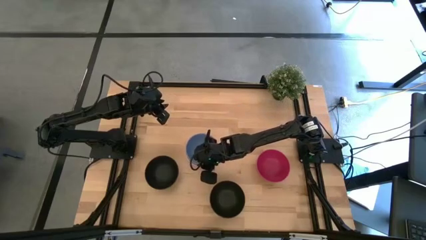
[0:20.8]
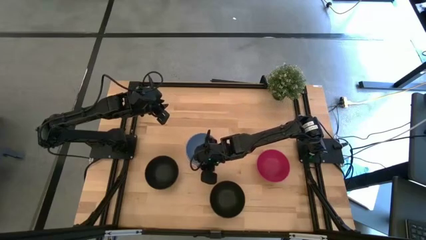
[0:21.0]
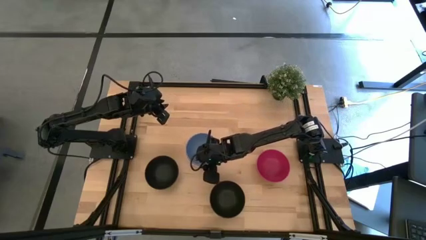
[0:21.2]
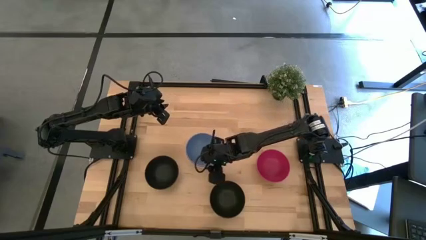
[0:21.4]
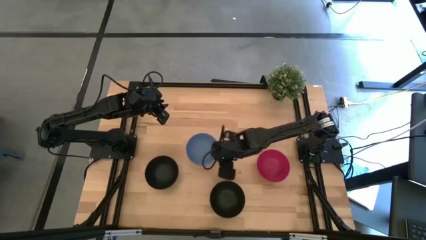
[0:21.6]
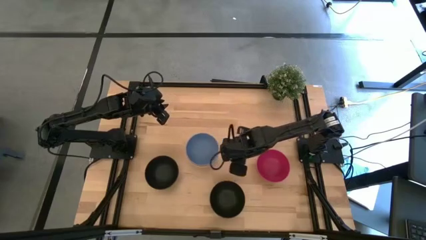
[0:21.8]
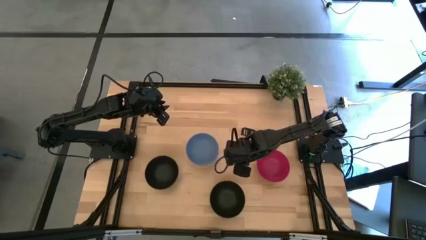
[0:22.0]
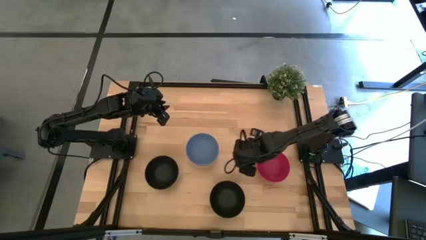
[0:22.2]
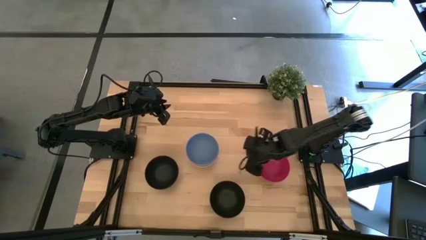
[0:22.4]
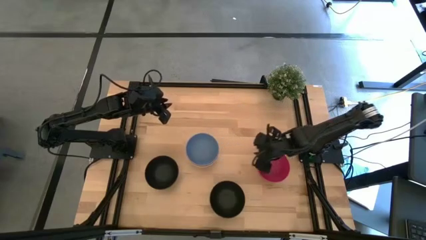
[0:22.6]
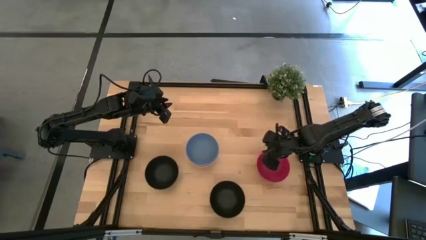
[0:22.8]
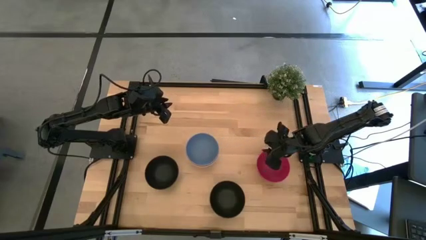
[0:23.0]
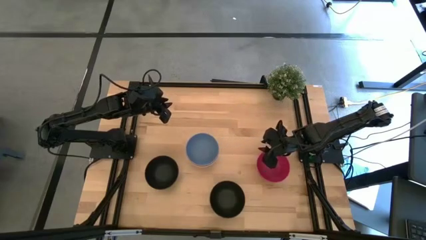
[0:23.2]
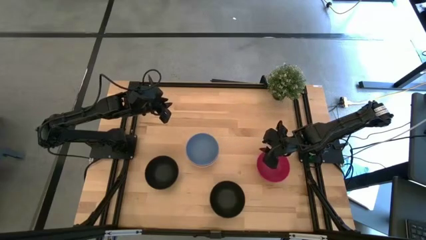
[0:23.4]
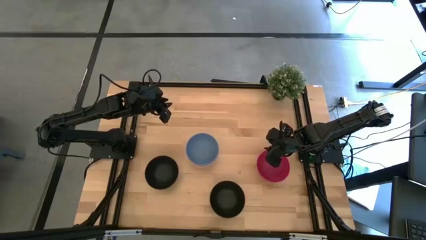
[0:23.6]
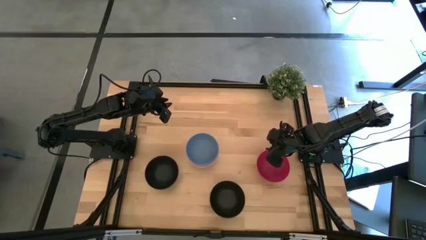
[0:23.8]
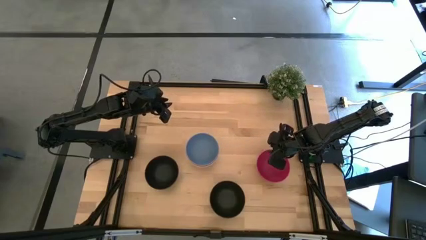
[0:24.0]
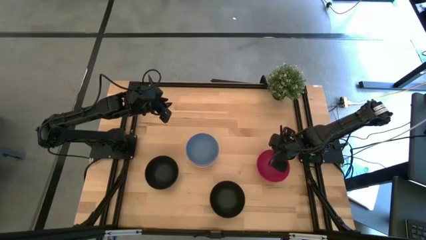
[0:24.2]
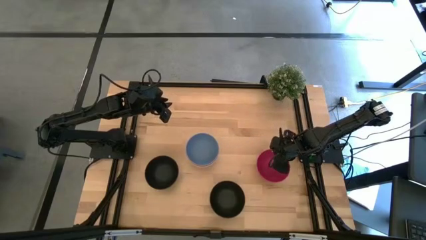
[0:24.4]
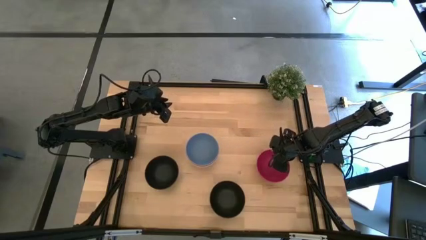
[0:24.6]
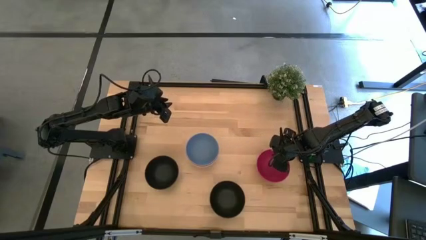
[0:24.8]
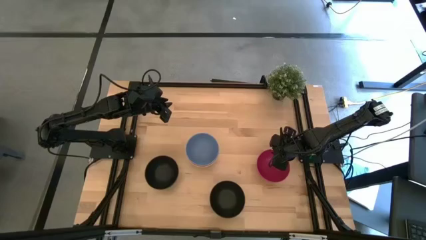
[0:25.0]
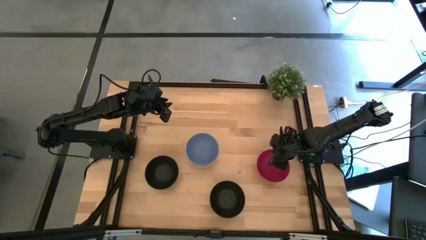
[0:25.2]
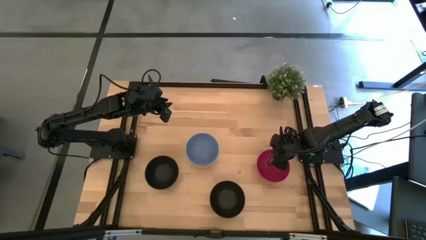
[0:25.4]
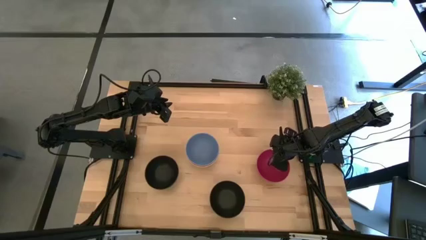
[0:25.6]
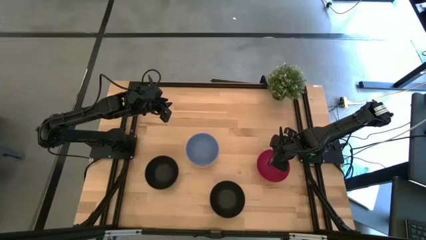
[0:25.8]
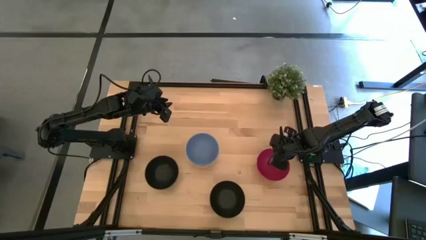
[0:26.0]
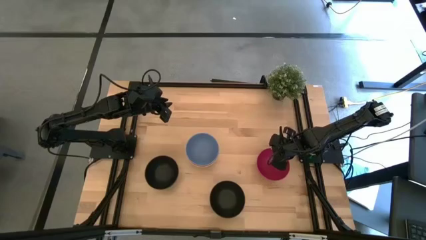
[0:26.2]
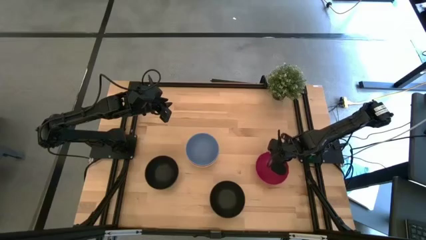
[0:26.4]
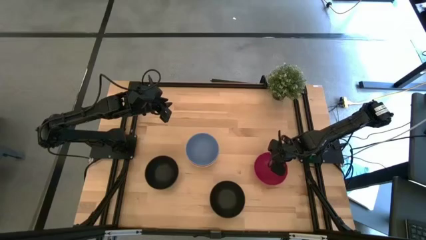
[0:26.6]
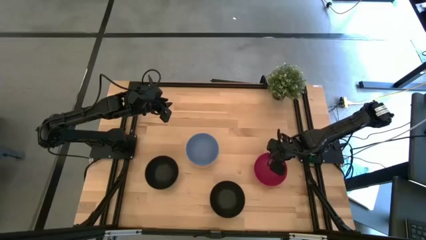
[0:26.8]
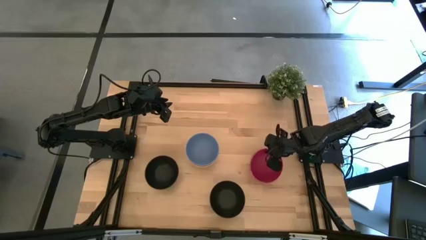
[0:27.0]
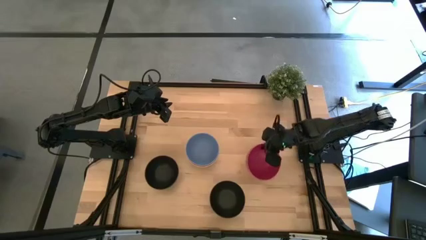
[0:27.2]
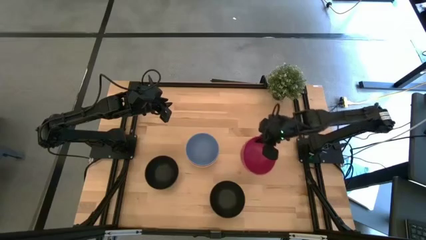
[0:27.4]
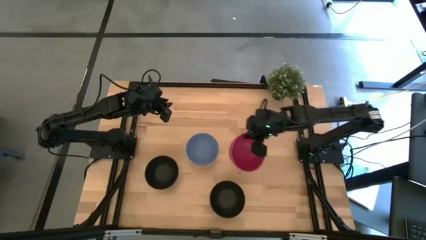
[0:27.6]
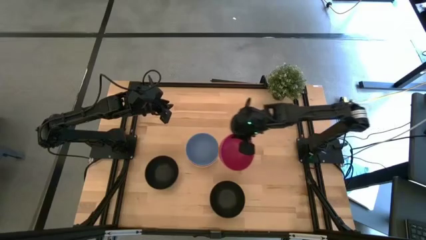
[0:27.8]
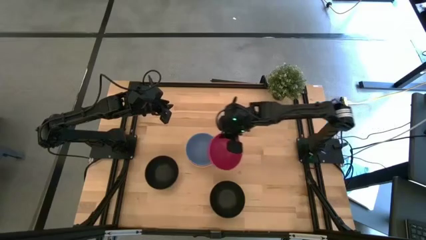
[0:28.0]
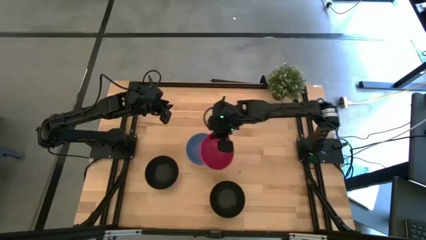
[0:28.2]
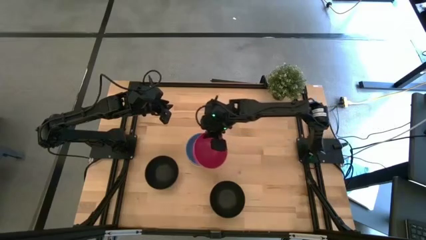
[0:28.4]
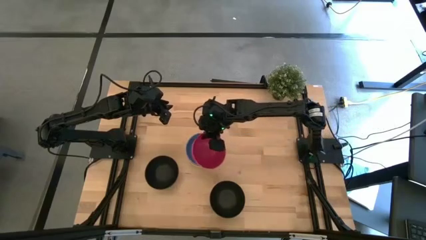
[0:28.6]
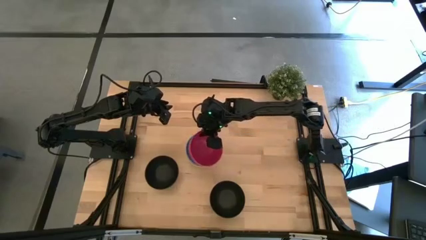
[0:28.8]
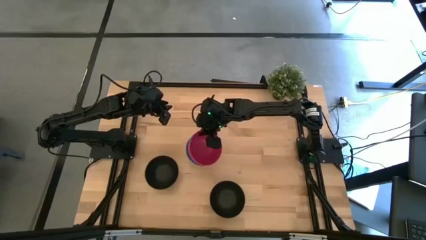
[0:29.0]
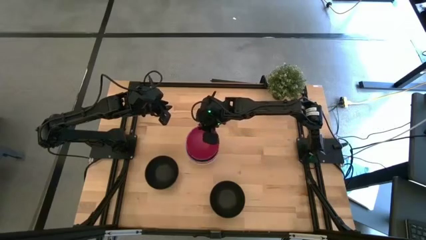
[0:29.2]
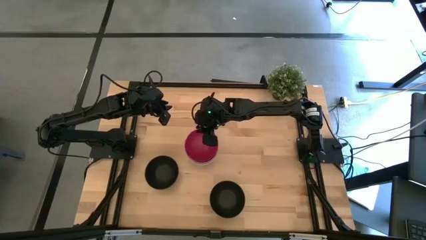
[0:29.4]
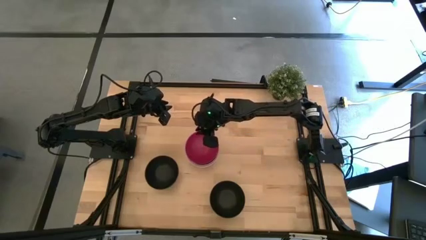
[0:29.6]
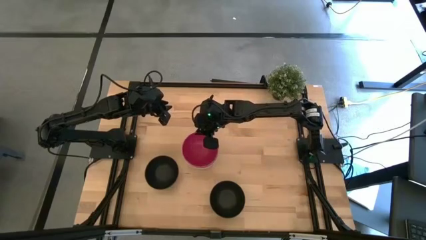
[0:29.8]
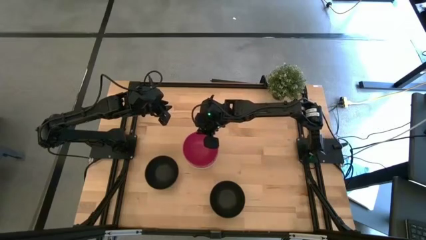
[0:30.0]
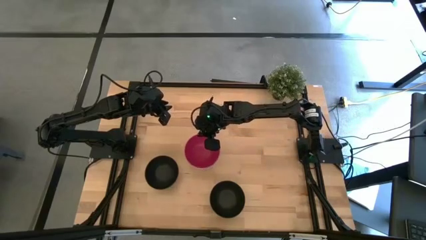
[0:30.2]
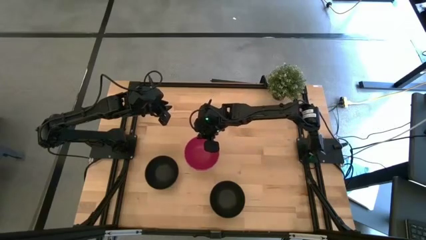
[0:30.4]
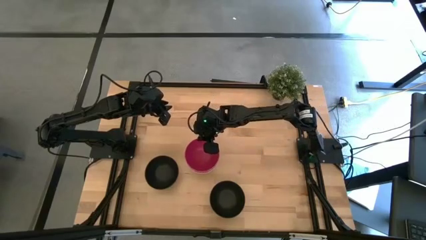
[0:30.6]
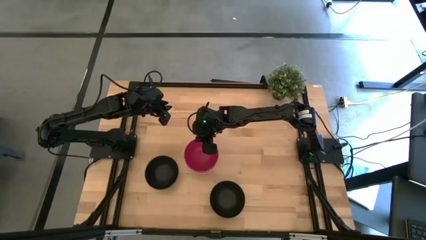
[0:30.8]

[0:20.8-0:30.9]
Task: Nest bowls inside each other
Stack the pink bowl on top of the blue bowl

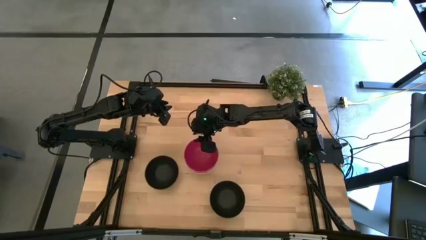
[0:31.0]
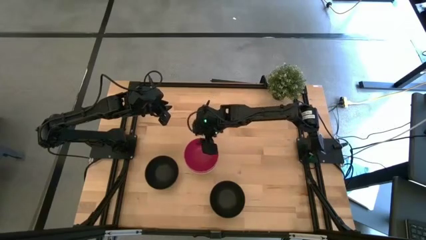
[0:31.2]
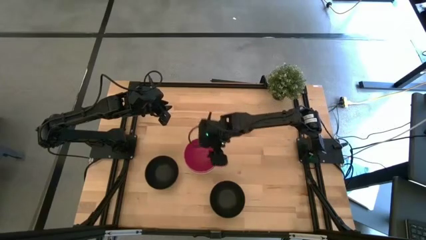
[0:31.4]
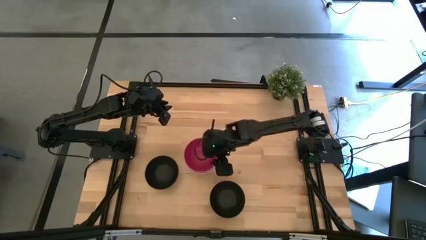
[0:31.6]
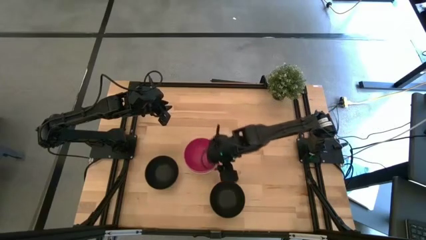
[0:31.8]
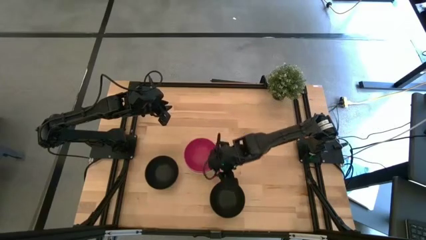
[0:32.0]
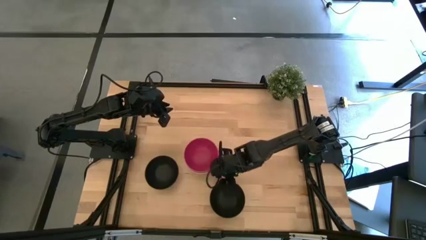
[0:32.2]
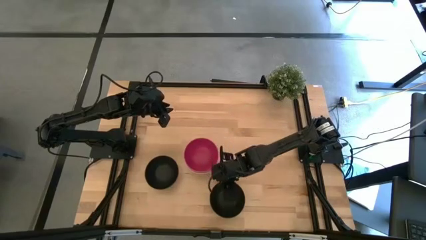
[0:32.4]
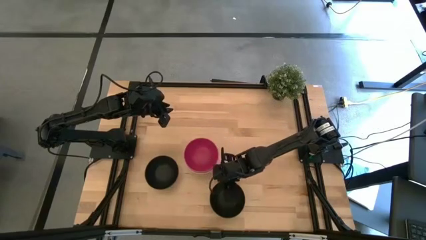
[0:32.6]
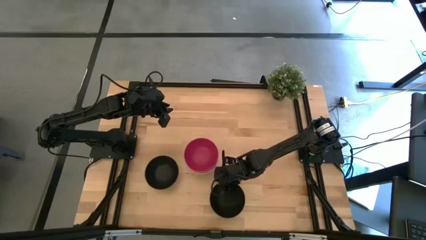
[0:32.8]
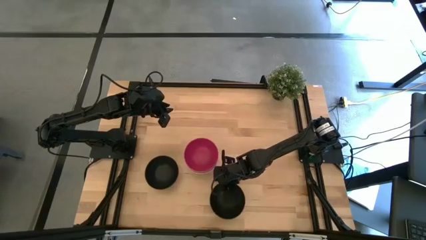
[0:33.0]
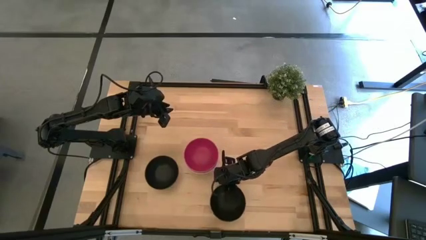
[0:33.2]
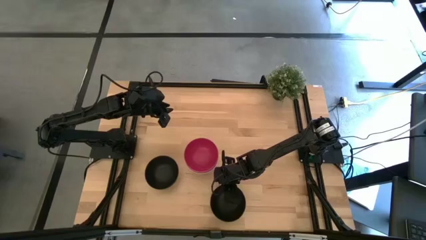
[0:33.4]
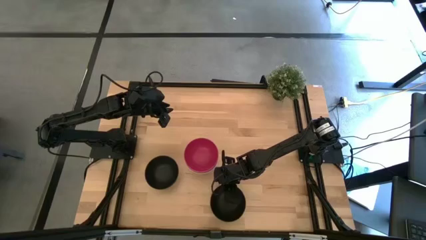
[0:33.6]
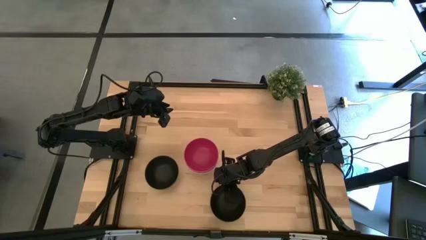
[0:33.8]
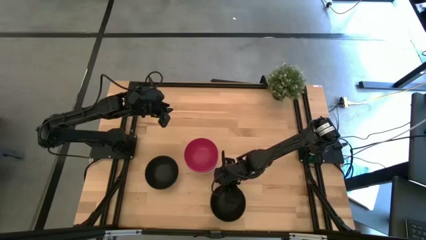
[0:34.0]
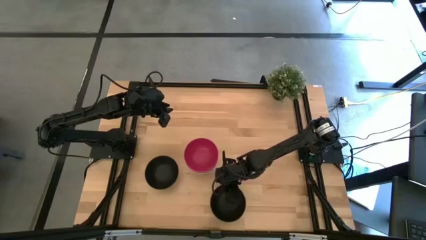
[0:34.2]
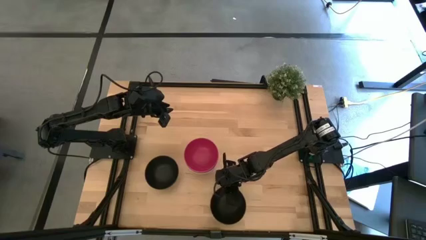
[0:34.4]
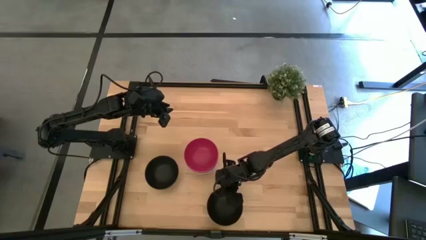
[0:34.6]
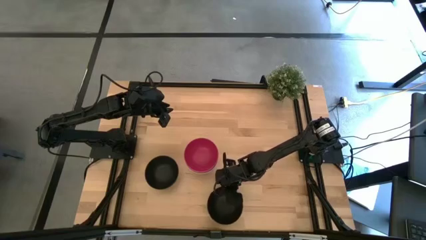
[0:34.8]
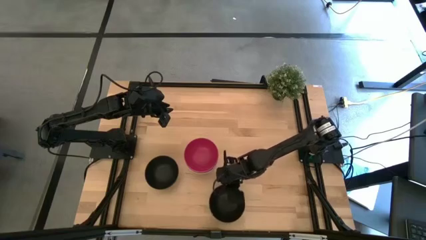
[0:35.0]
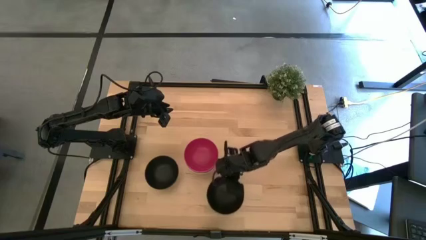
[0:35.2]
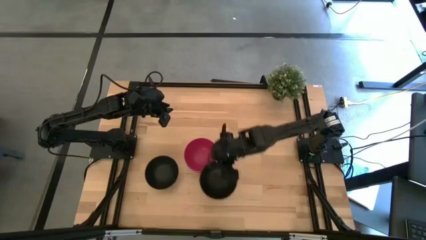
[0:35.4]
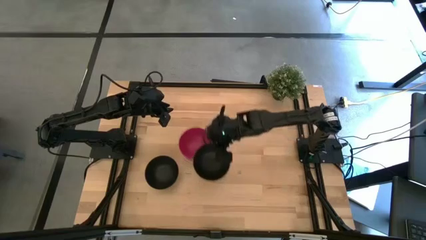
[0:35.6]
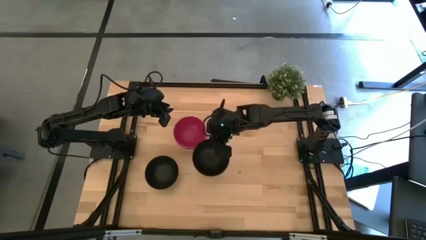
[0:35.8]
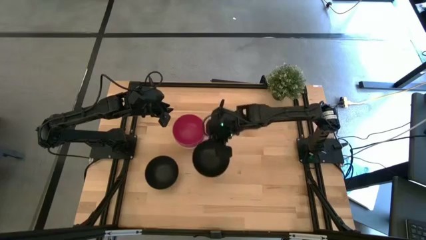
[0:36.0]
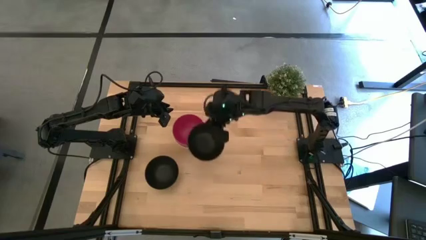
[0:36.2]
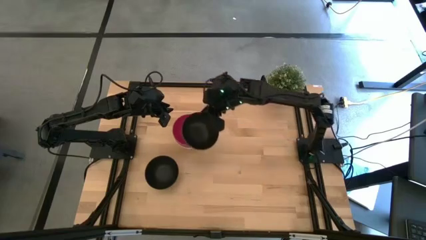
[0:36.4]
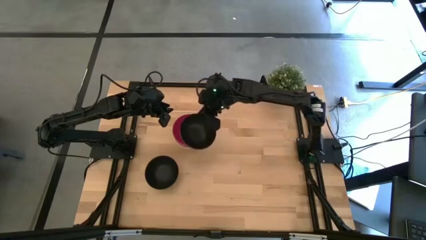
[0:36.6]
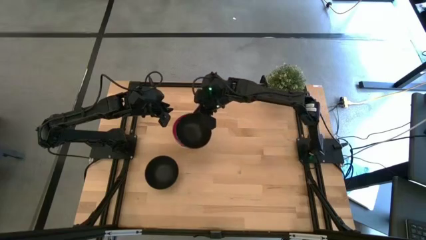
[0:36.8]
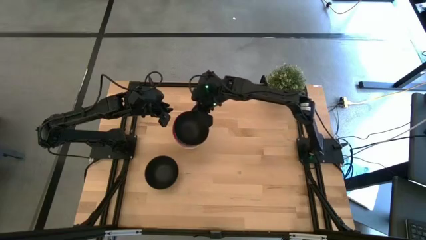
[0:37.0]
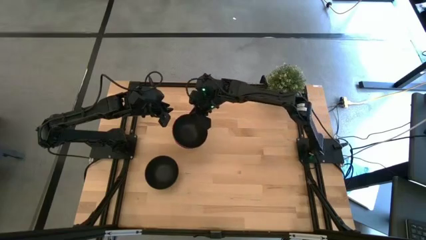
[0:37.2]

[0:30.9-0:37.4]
Stack the bottom black bowl on top of the pink bowl
